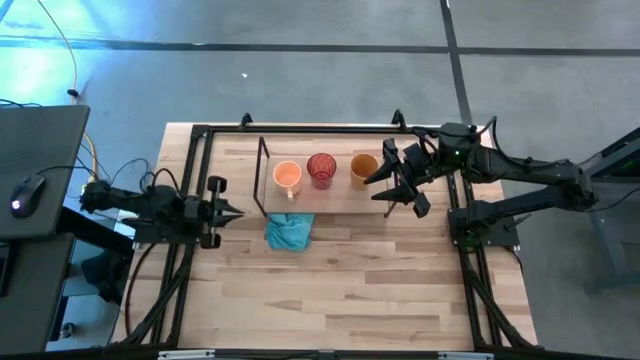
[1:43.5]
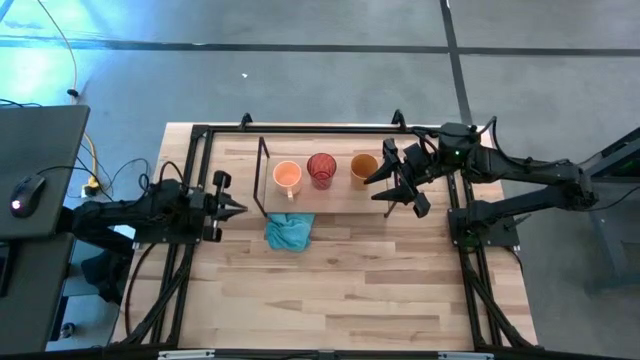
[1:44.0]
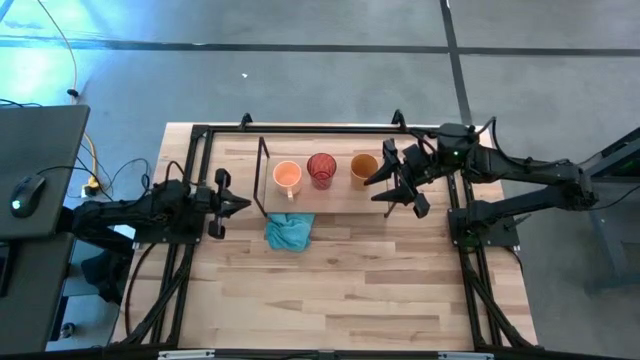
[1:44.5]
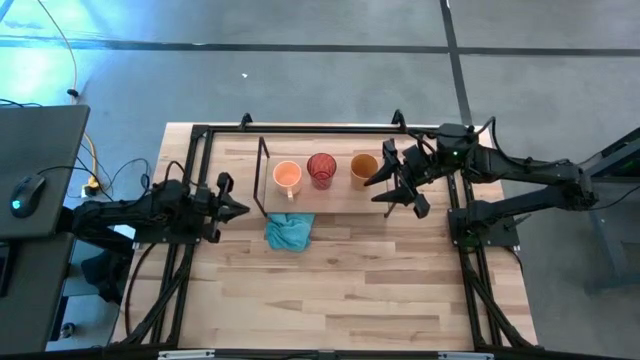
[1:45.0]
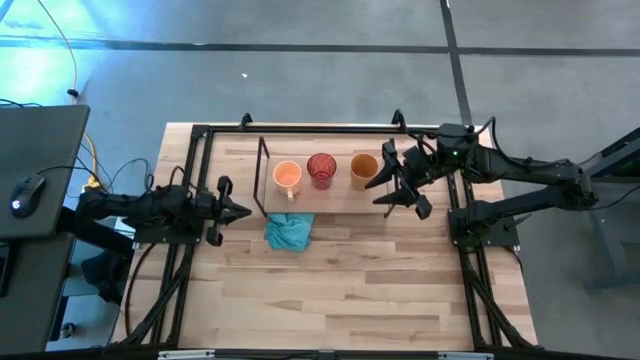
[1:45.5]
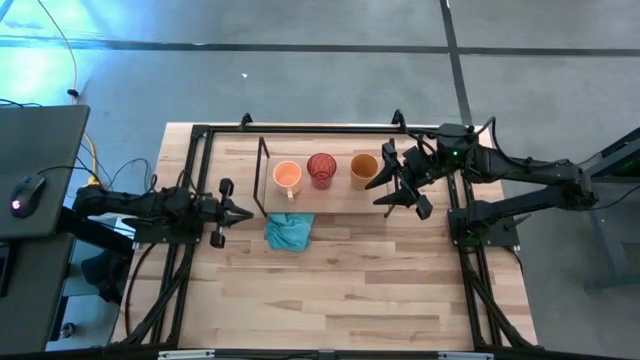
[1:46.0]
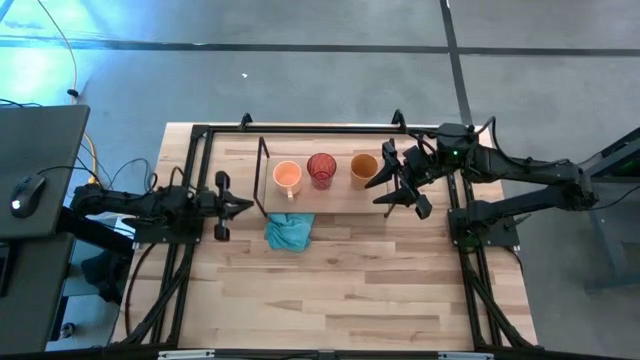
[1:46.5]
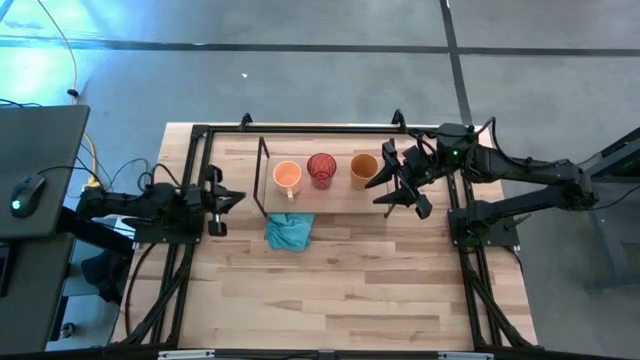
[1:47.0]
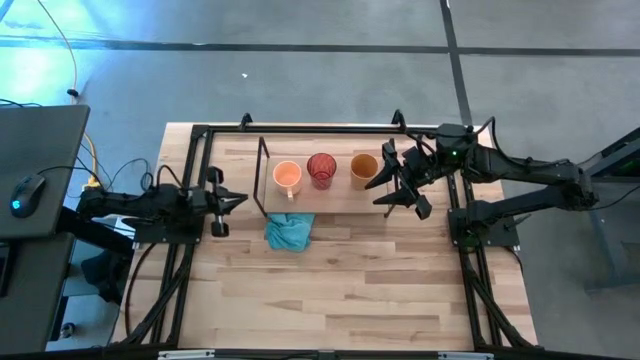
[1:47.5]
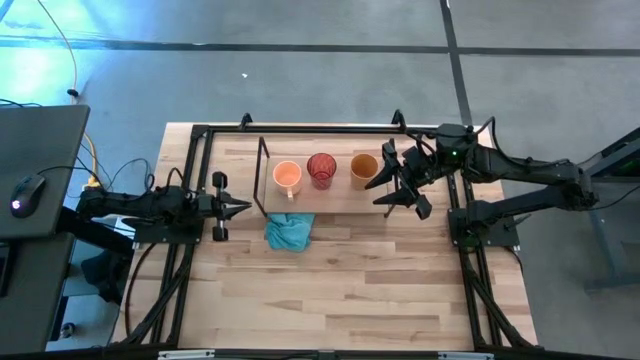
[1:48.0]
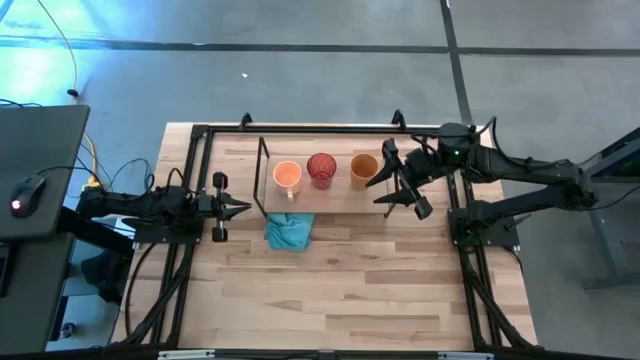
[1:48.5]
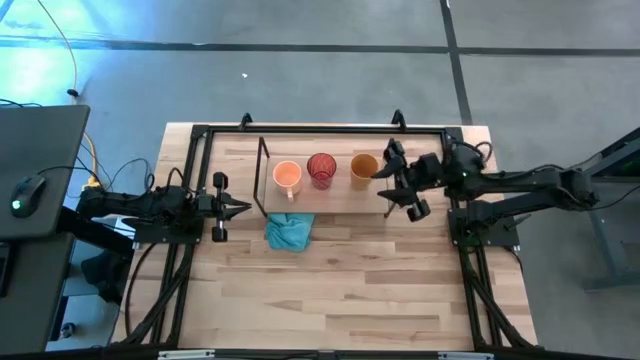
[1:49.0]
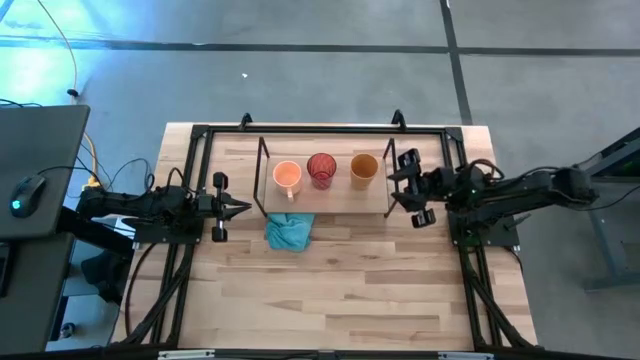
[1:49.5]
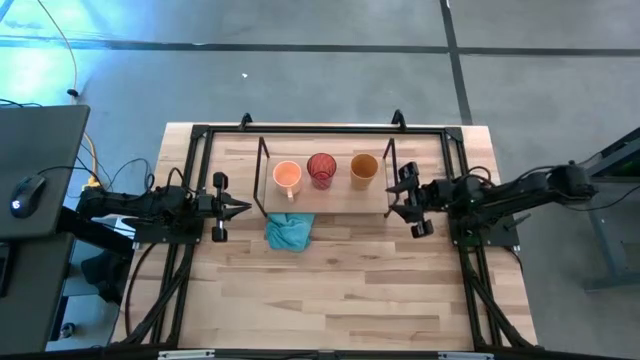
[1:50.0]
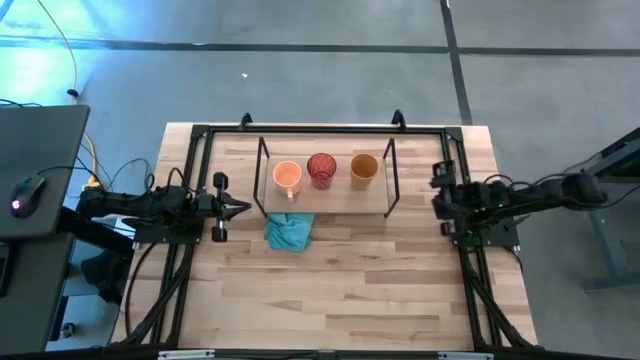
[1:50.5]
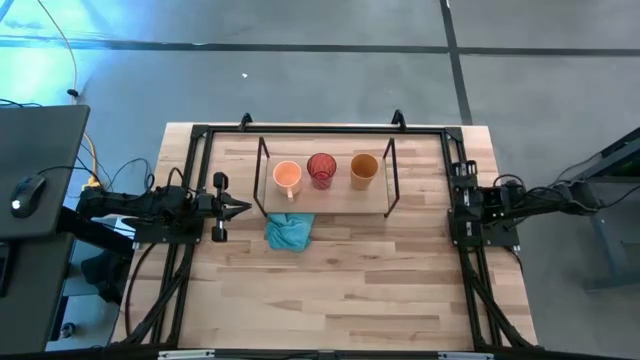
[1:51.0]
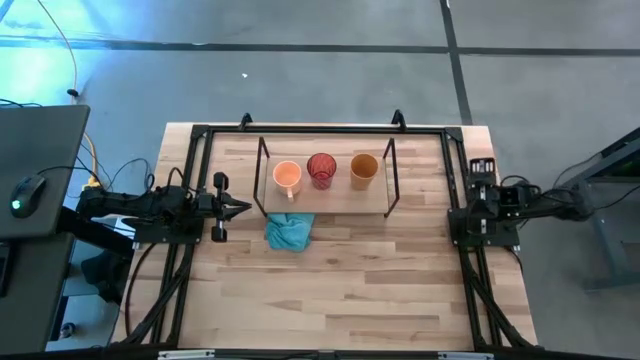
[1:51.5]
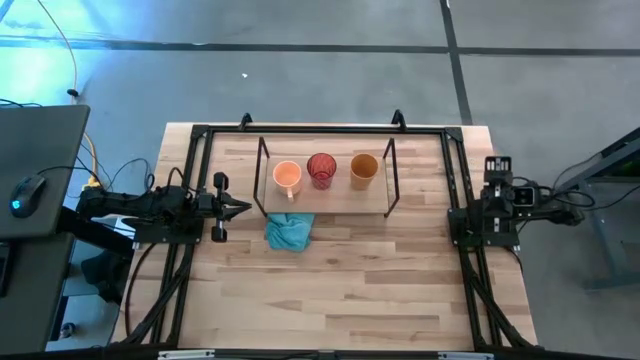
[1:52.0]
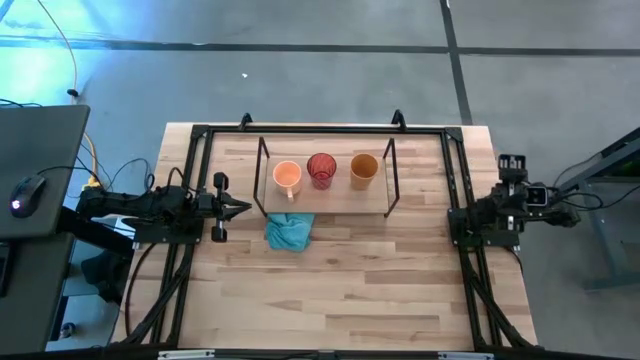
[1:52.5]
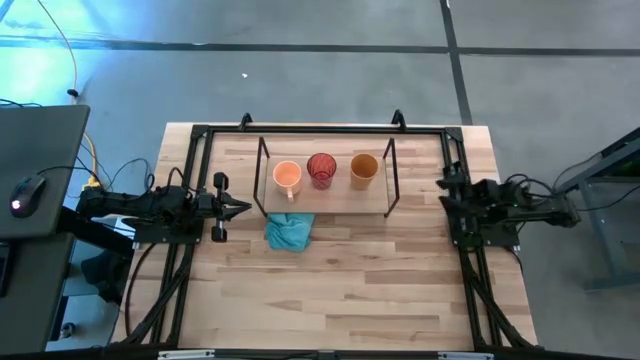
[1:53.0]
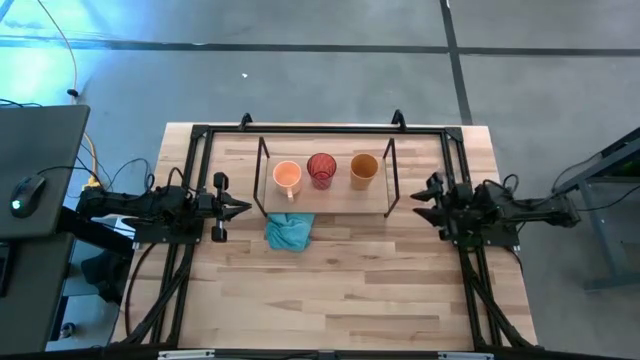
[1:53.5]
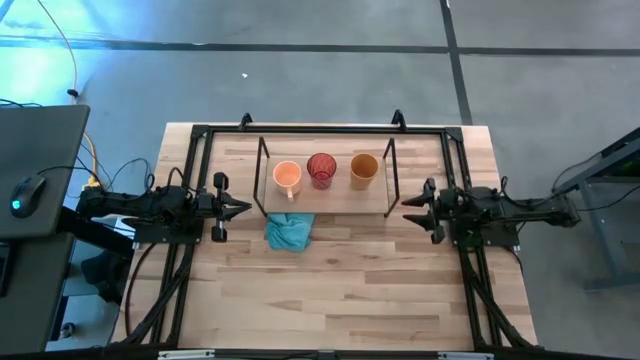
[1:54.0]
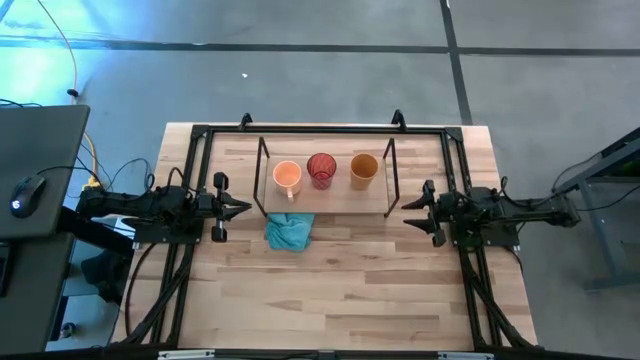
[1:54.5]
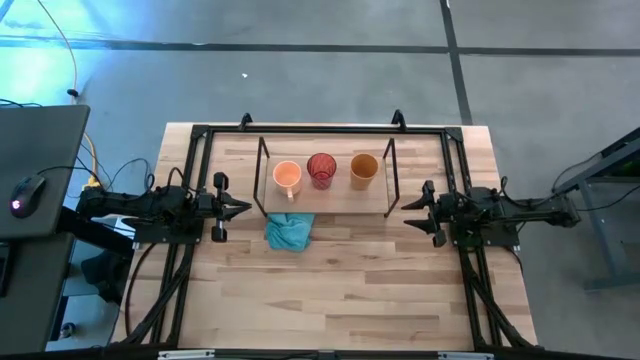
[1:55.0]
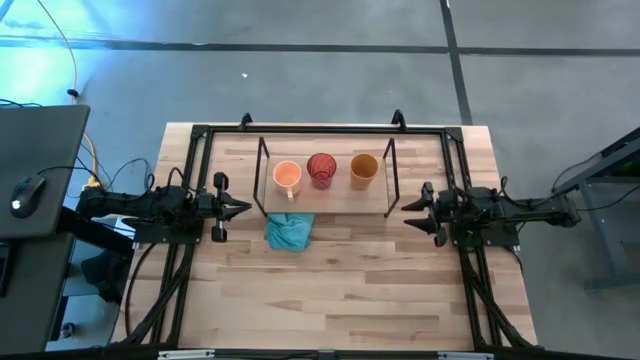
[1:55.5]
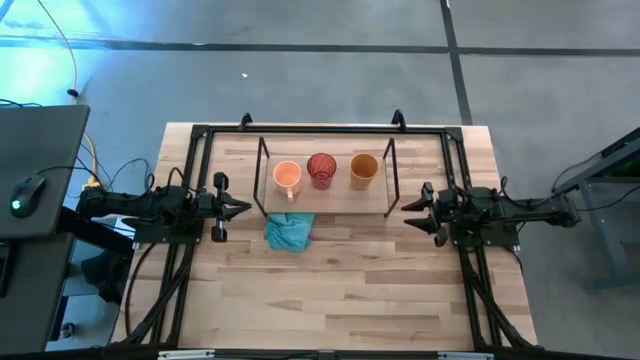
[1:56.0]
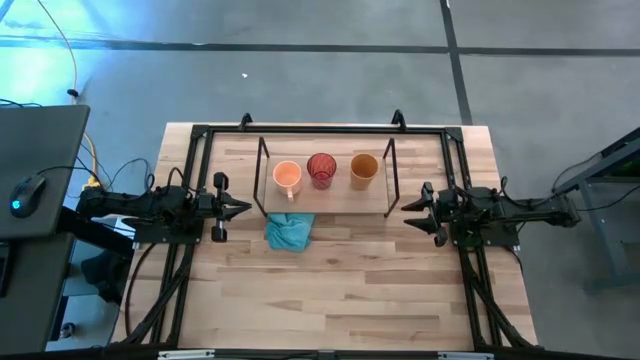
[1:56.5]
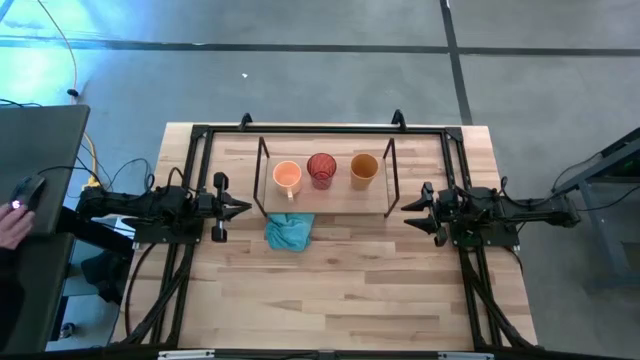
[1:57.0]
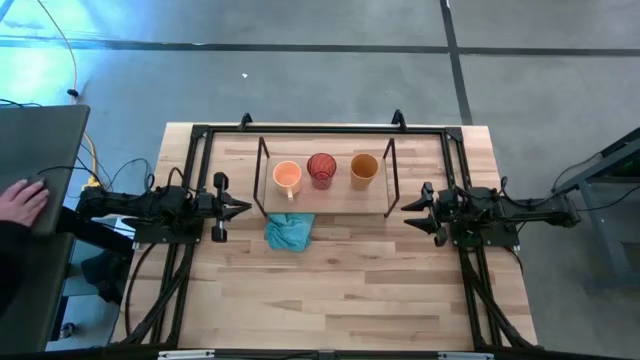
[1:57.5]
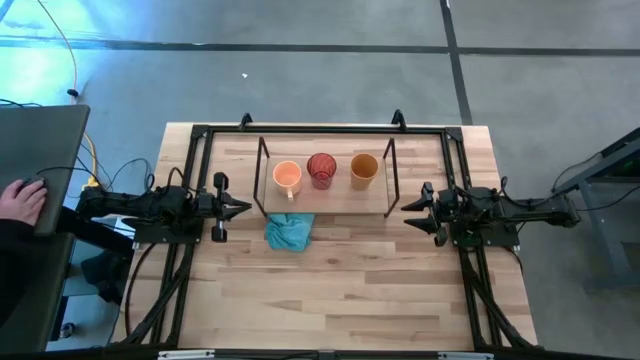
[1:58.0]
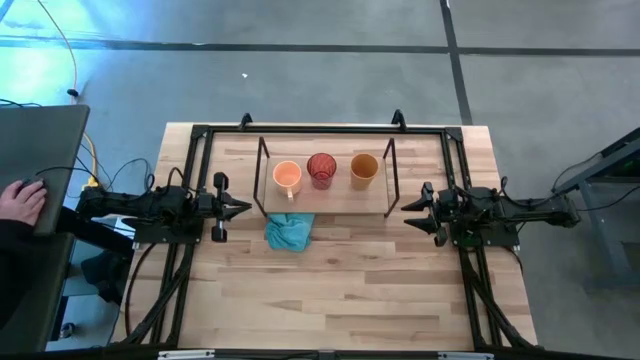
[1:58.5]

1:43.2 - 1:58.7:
Task: Stack small to large cups/mugs on shelf
Return to Home Position

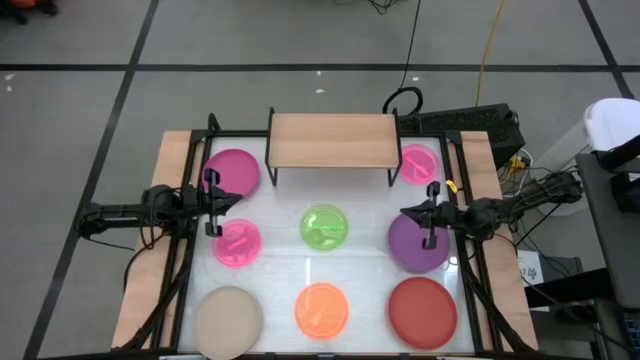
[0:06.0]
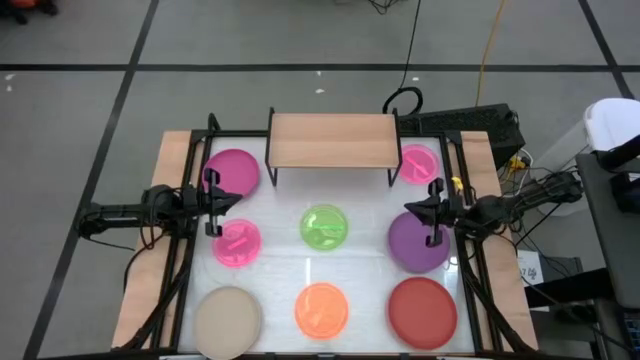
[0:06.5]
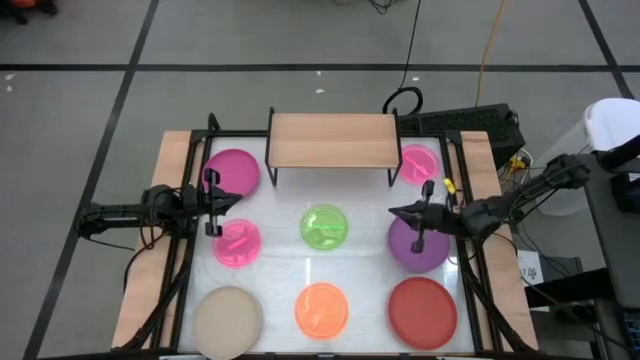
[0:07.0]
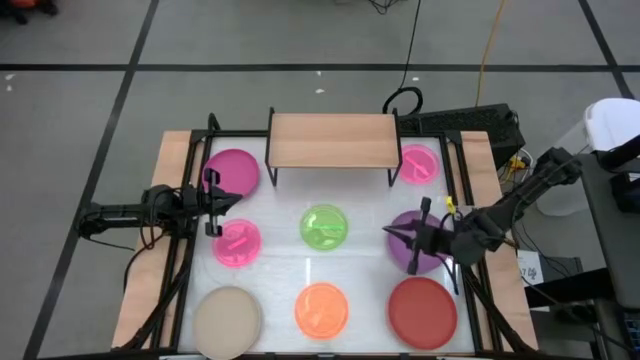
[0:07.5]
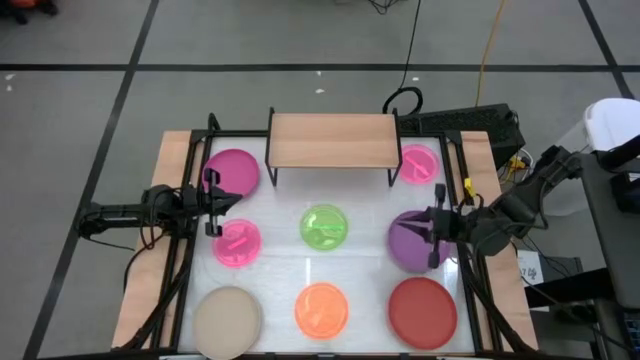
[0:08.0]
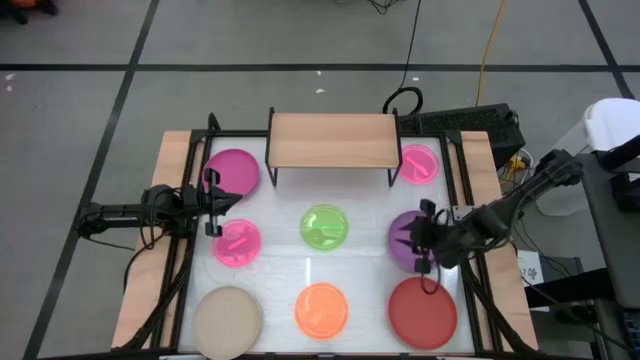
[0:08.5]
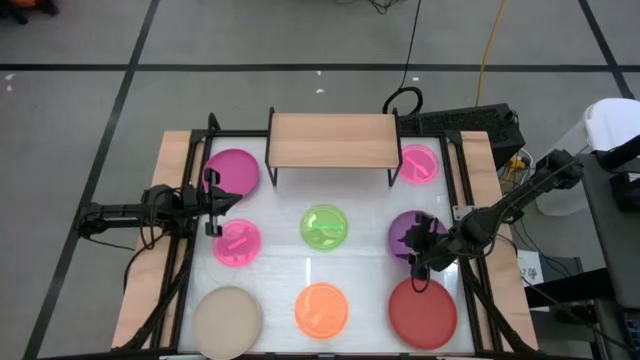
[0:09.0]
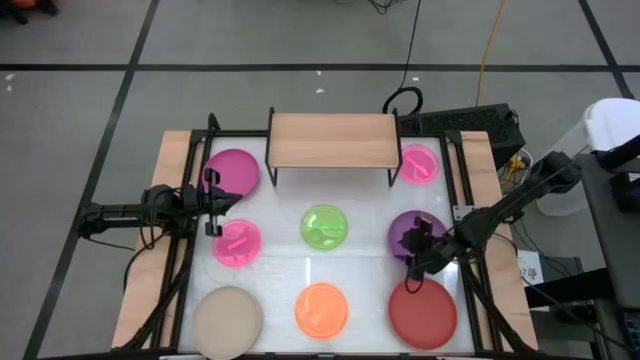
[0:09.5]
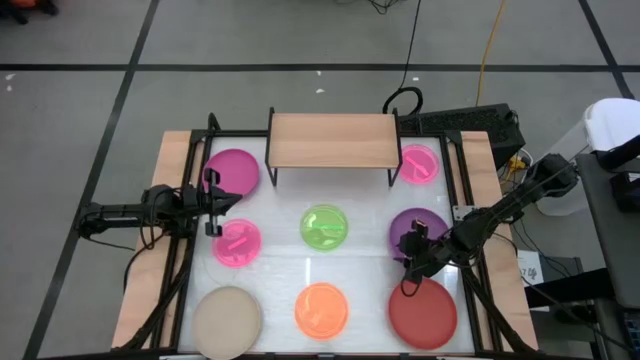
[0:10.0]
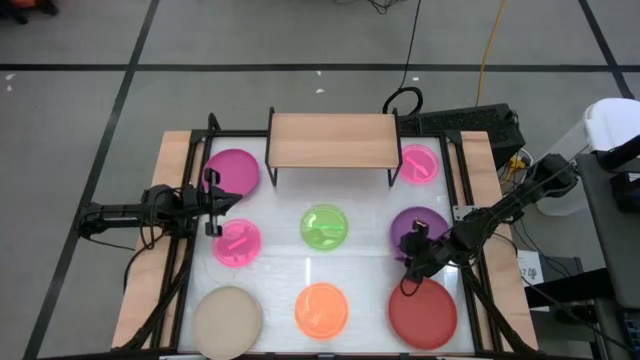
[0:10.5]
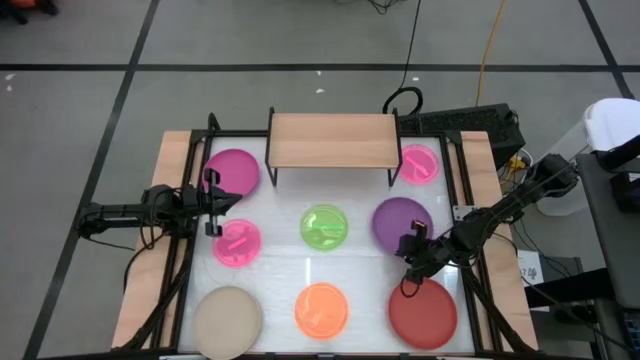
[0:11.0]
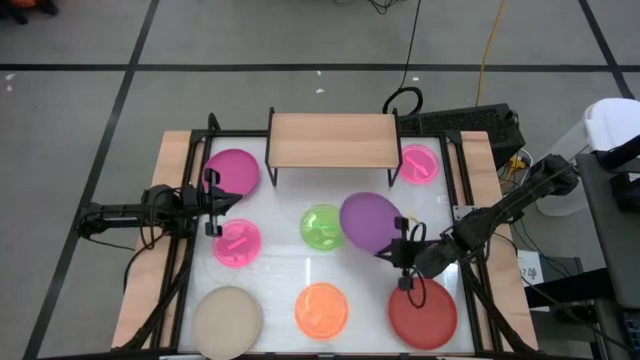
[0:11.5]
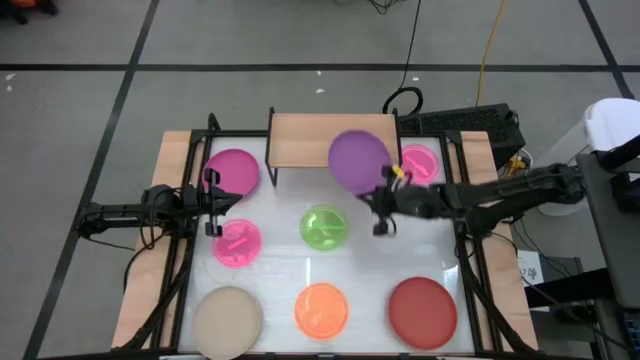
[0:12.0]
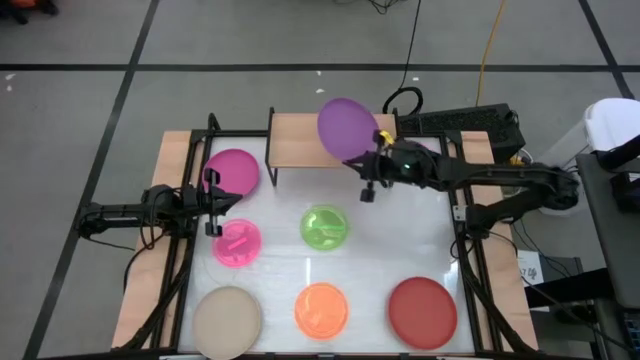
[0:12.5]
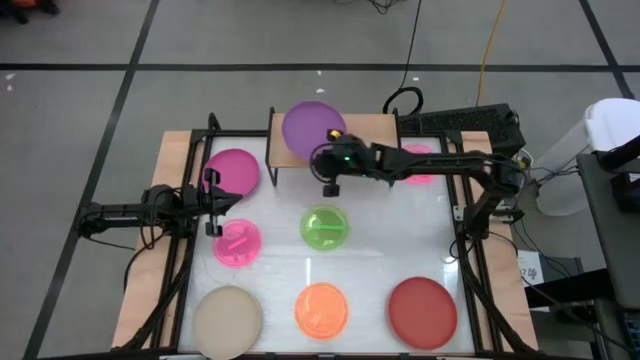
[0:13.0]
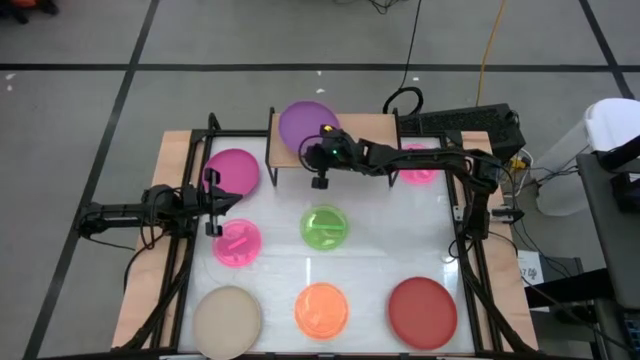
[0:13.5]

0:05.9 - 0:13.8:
Task: Place and stack plates onto a shelf
Put the violet plate on the shelf
